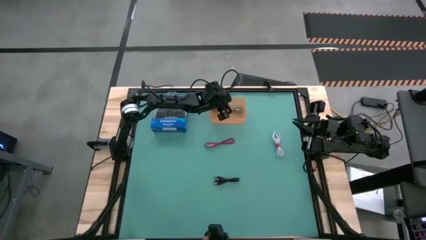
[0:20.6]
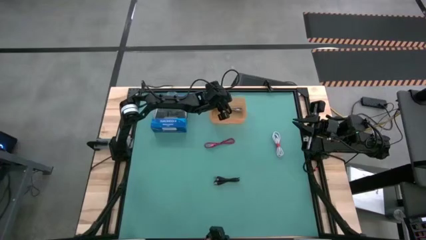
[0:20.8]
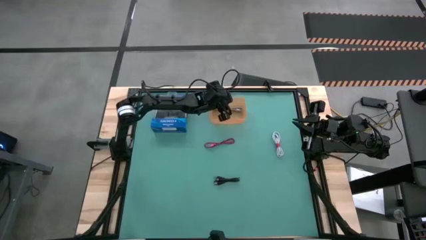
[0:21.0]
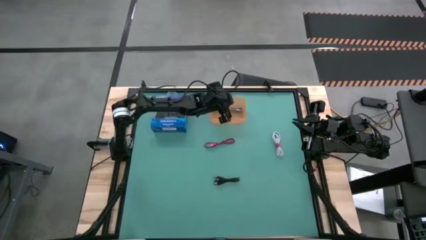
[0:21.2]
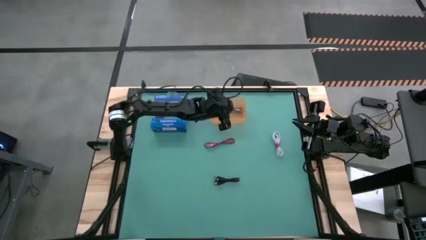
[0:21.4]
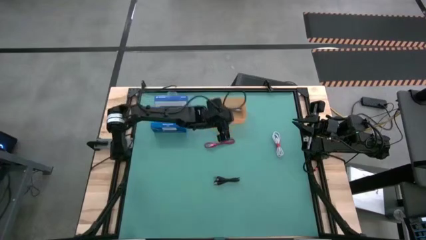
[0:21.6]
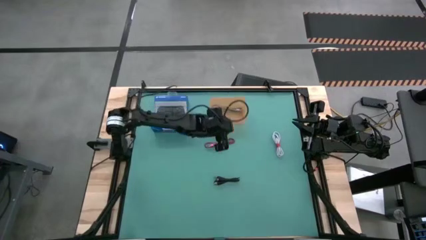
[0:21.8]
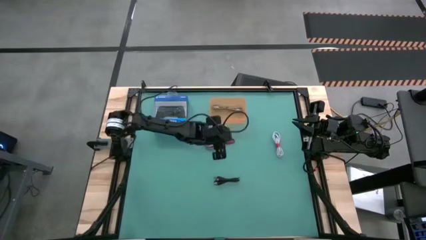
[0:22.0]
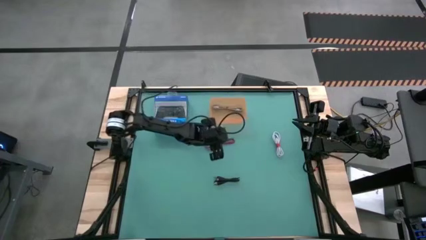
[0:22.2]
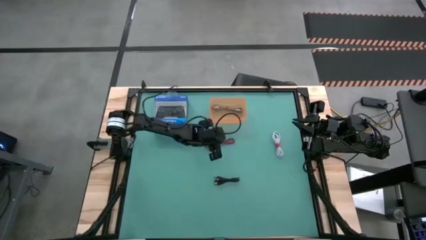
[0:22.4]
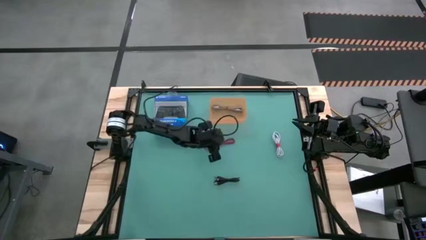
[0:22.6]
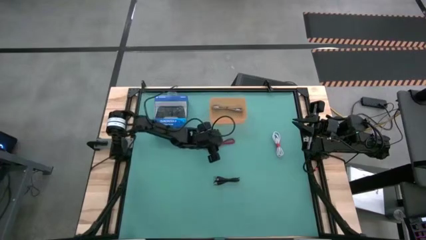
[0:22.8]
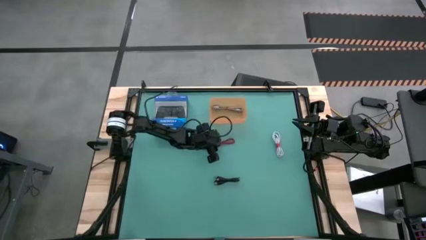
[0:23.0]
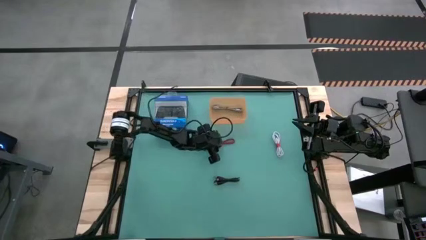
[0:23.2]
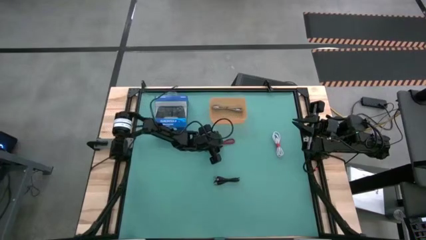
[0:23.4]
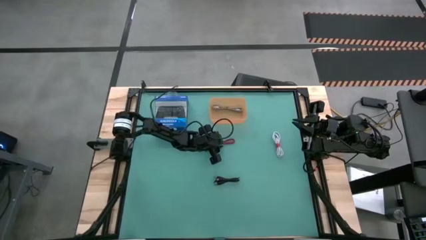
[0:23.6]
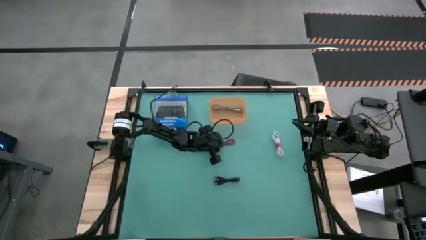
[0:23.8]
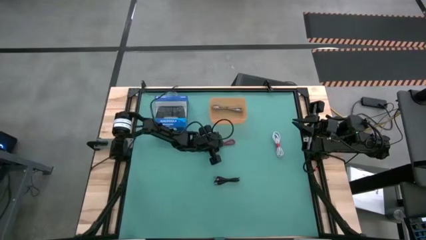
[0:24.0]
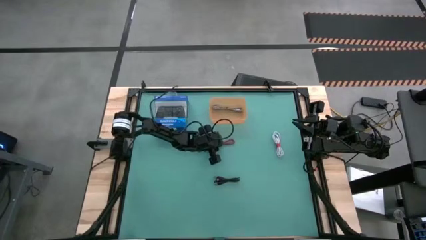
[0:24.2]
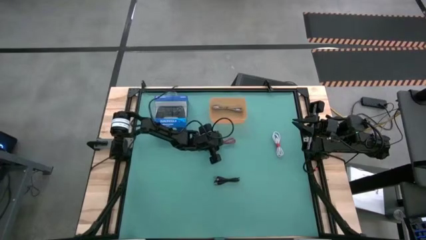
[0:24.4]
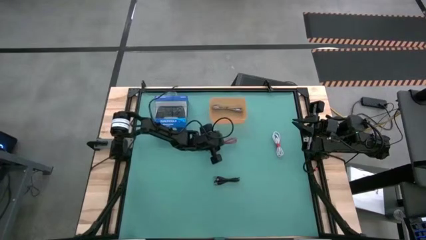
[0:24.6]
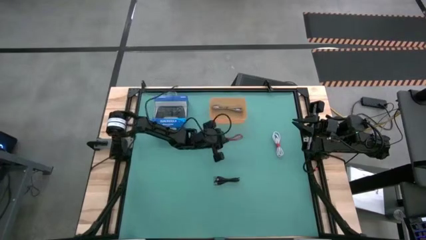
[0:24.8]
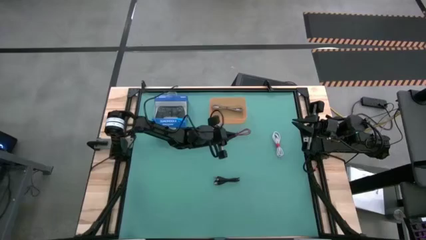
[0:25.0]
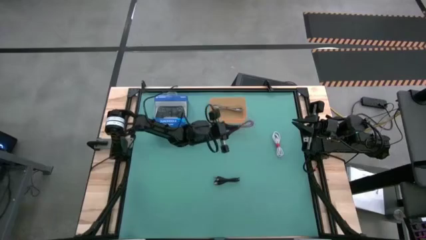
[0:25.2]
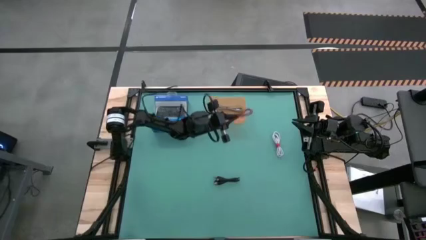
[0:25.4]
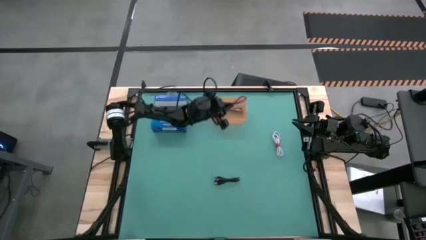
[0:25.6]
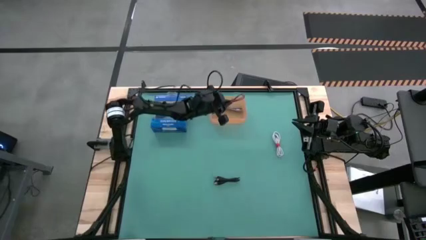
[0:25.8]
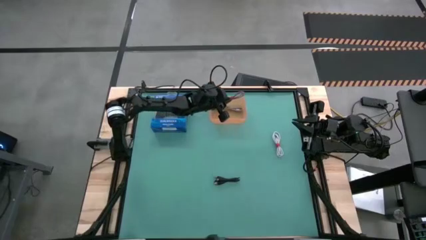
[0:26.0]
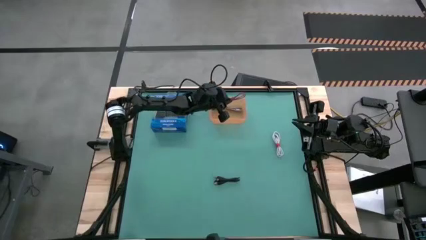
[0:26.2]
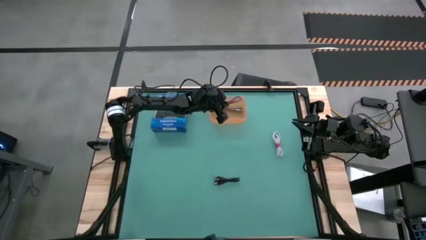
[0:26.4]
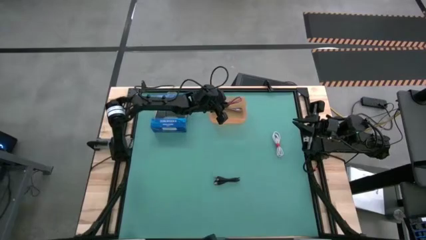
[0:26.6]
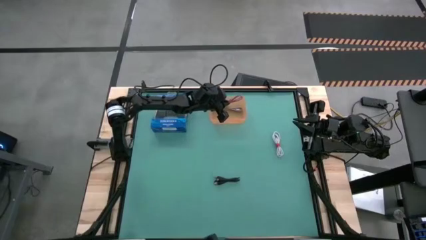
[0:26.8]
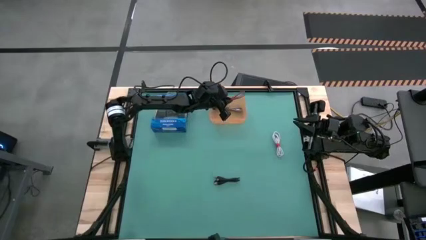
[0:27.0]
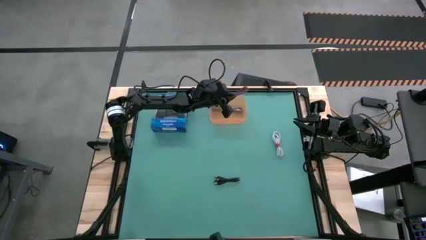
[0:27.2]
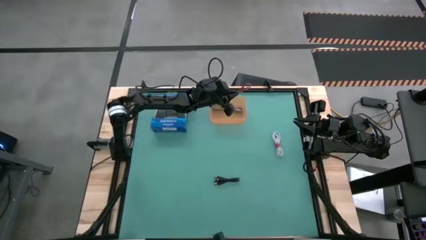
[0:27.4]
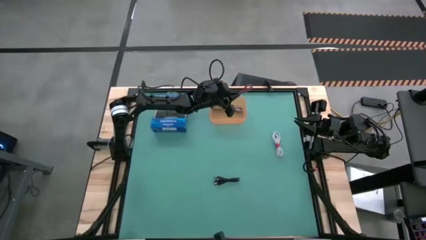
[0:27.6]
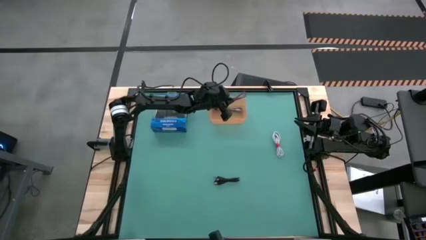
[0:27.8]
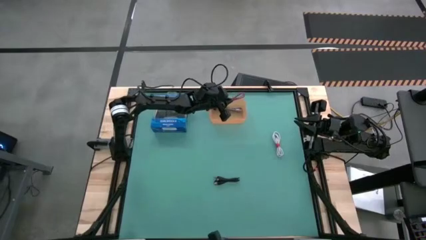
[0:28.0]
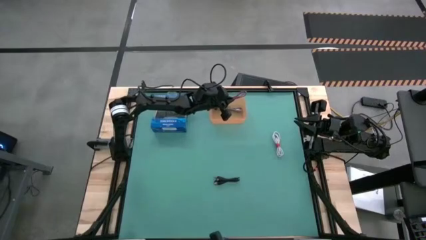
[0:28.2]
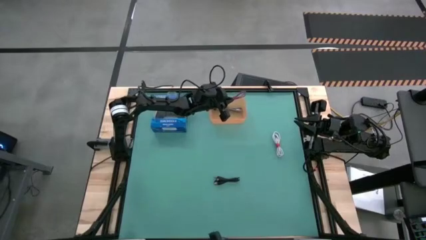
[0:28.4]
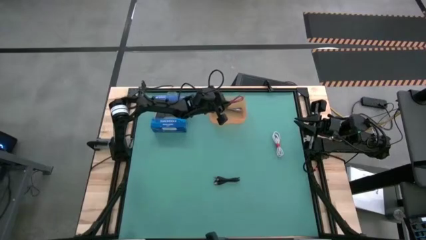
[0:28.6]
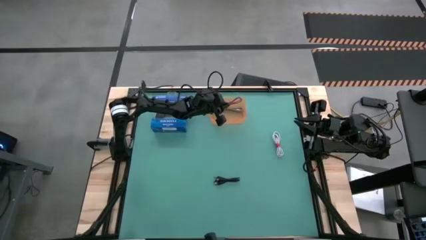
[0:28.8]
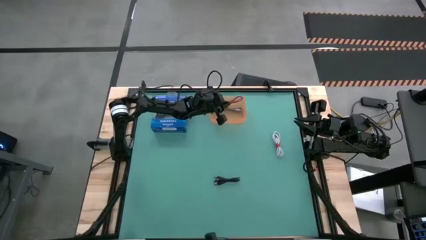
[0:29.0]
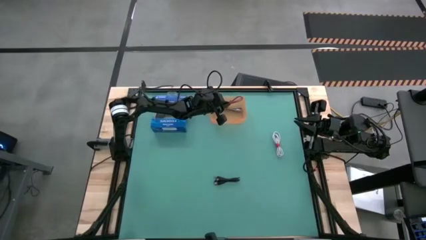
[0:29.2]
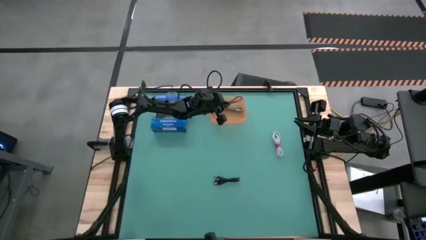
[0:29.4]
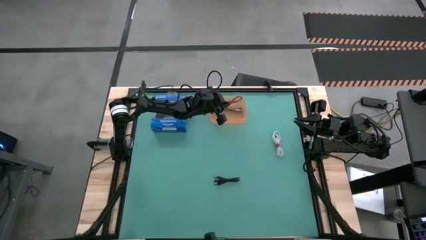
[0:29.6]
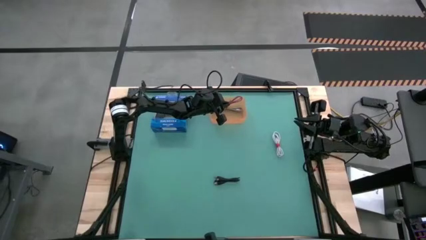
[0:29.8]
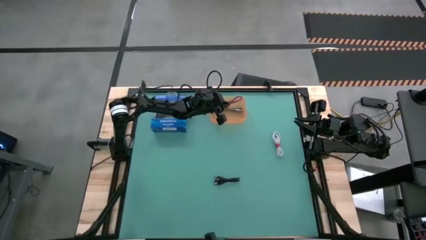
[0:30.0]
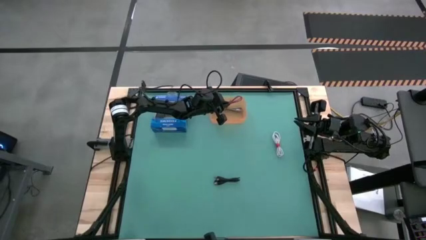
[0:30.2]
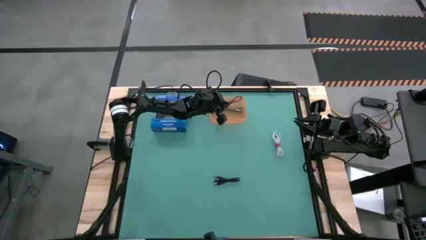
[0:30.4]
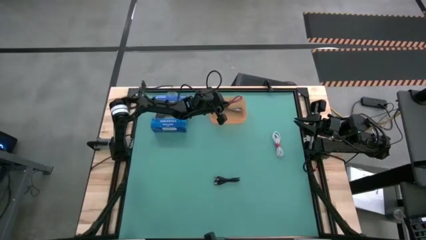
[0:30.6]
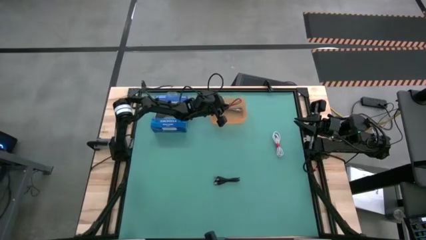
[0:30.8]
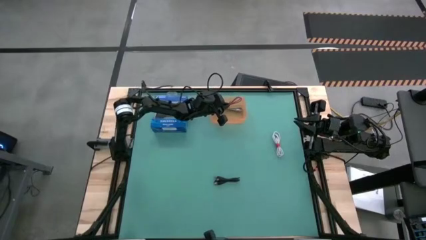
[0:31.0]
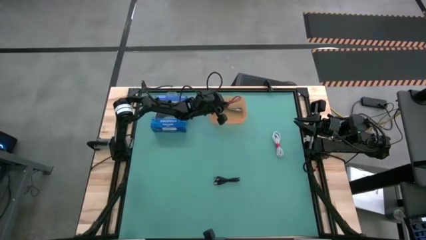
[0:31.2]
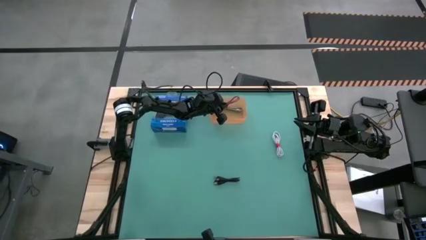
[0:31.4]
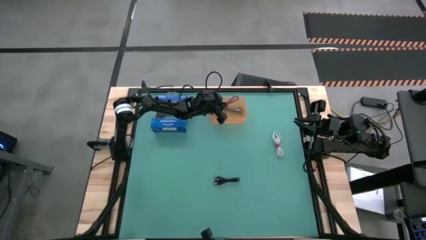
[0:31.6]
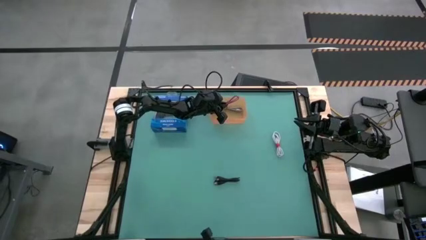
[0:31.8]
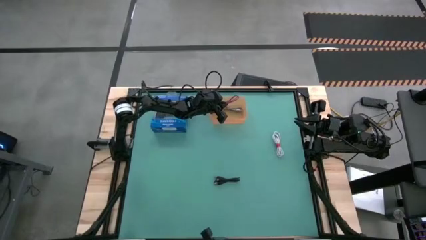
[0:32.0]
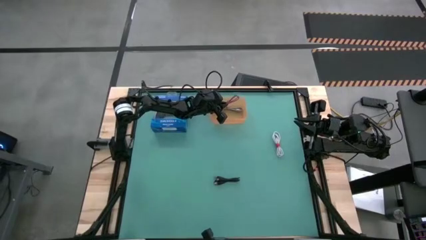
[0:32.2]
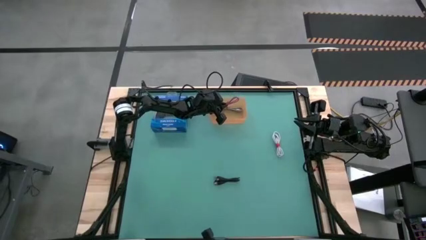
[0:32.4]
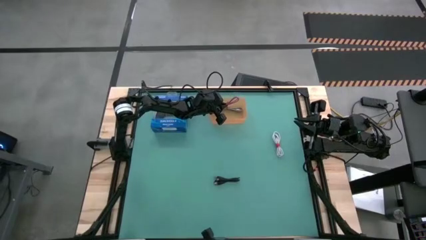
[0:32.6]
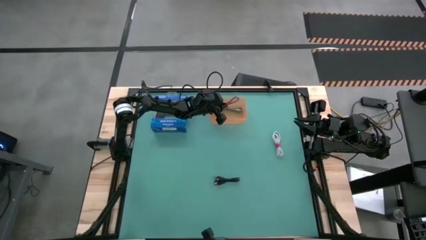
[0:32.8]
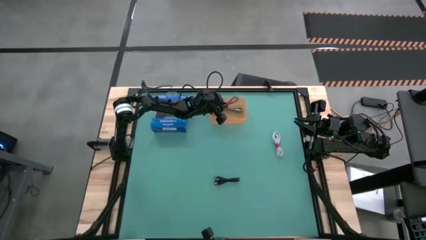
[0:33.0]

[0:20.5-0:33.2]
Task: Pick and place USB-C Cables
Put the pink charger cable into the orange bin
